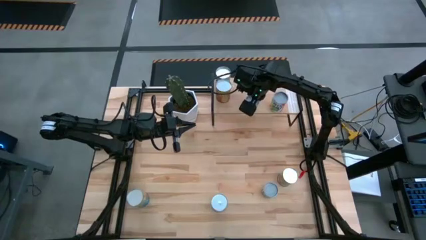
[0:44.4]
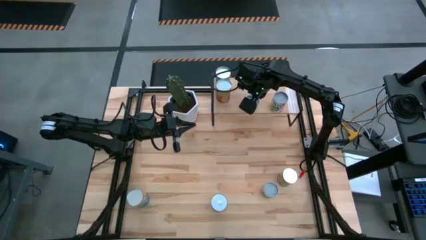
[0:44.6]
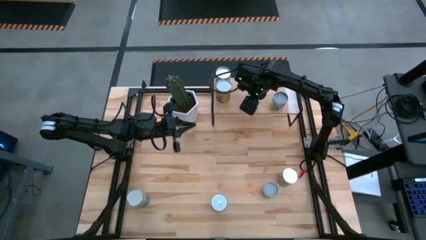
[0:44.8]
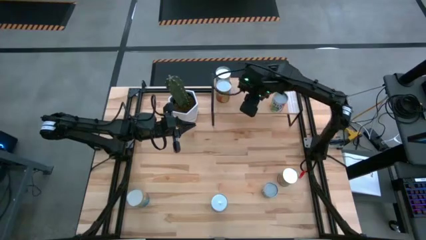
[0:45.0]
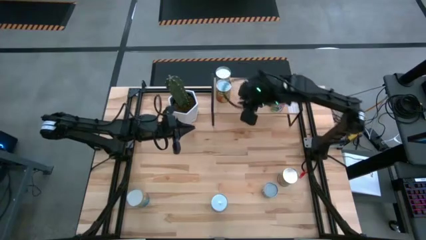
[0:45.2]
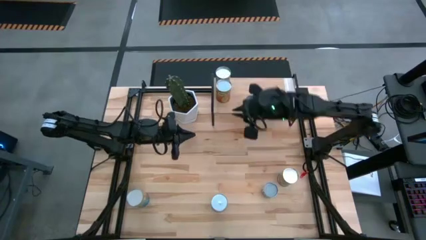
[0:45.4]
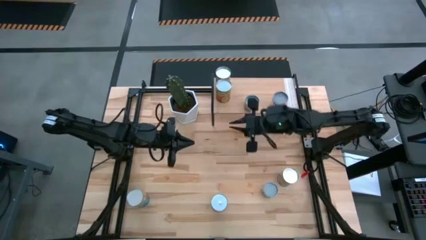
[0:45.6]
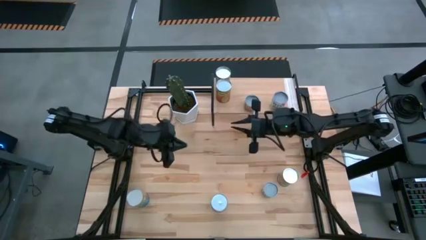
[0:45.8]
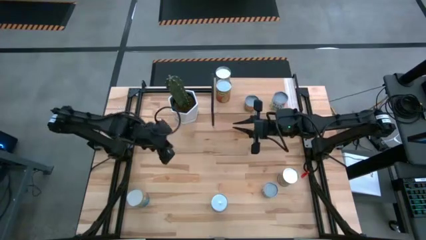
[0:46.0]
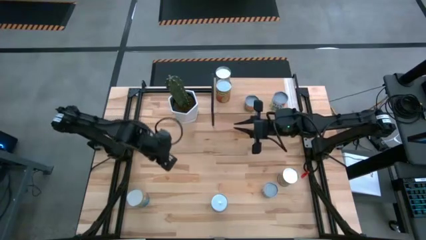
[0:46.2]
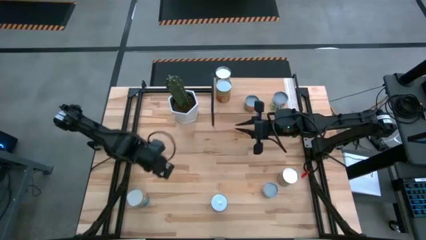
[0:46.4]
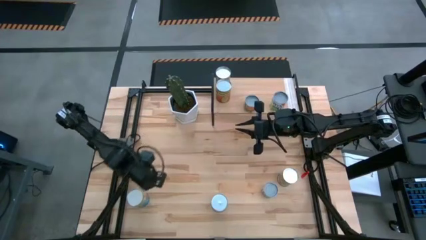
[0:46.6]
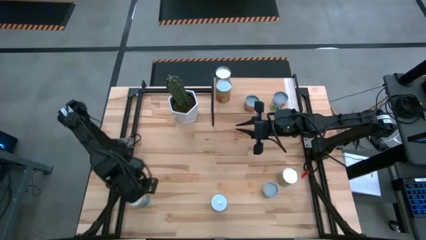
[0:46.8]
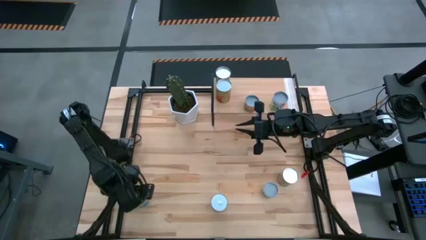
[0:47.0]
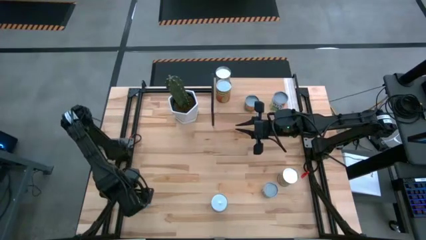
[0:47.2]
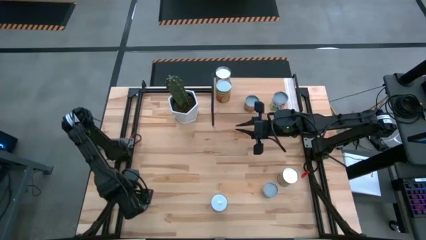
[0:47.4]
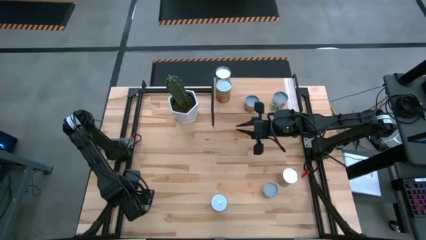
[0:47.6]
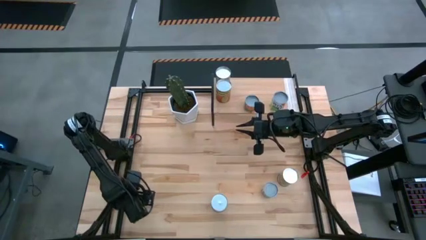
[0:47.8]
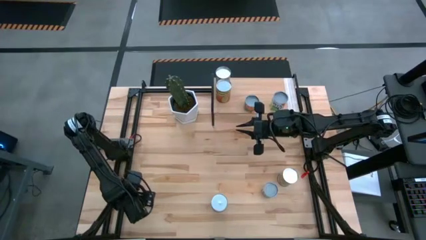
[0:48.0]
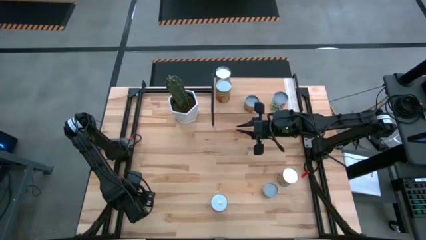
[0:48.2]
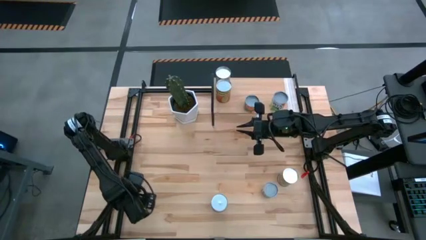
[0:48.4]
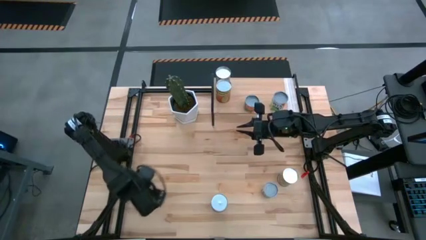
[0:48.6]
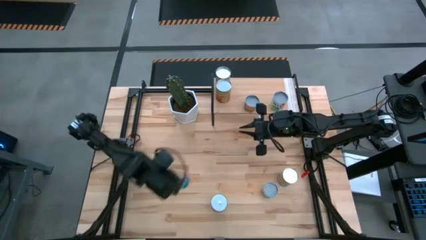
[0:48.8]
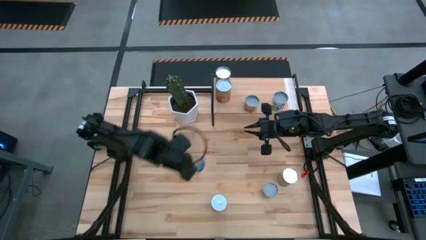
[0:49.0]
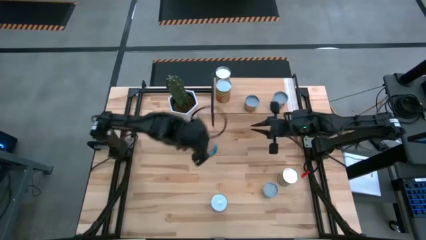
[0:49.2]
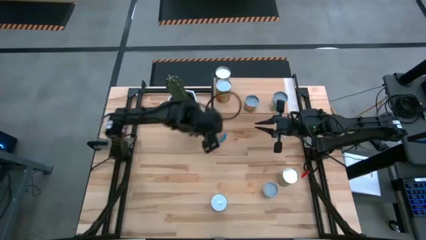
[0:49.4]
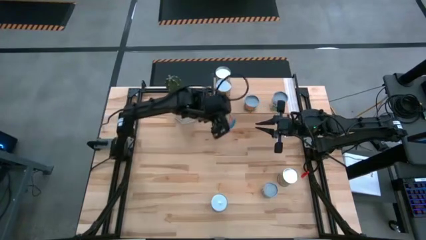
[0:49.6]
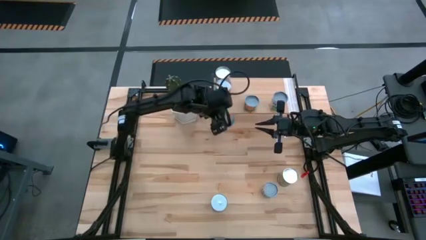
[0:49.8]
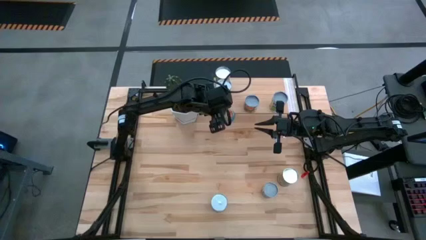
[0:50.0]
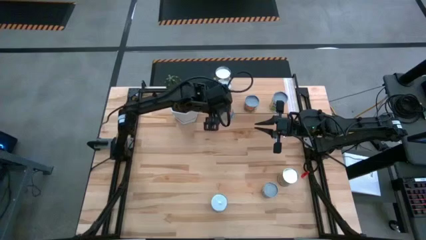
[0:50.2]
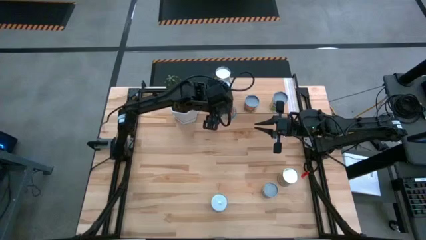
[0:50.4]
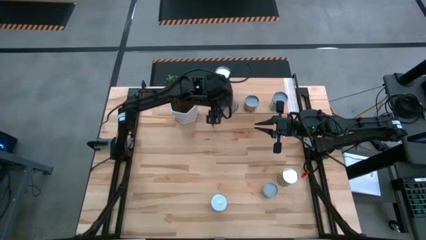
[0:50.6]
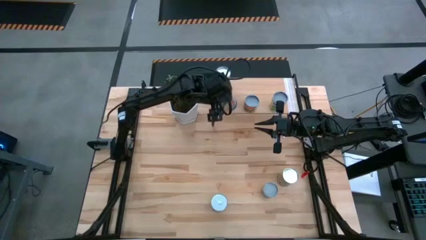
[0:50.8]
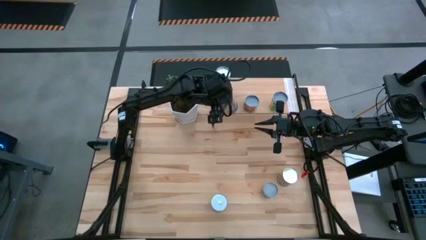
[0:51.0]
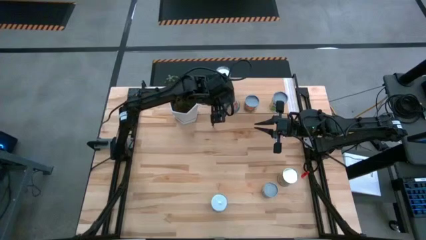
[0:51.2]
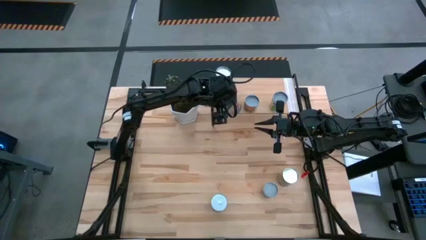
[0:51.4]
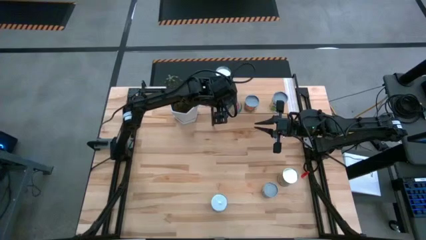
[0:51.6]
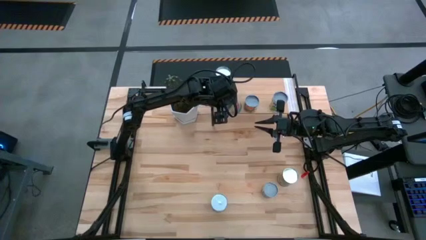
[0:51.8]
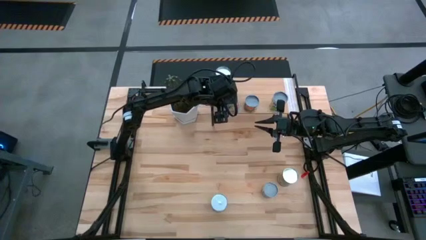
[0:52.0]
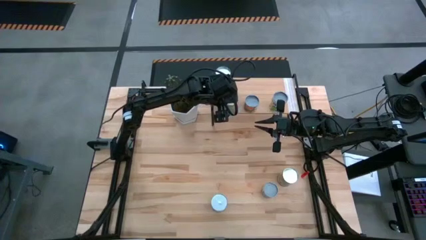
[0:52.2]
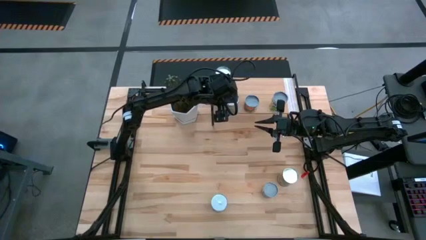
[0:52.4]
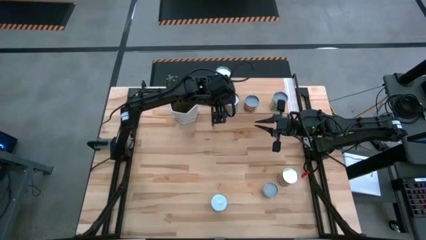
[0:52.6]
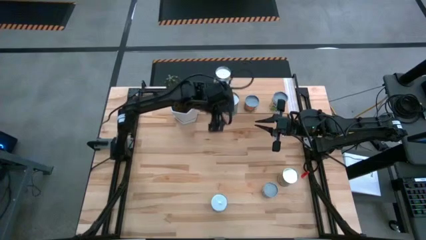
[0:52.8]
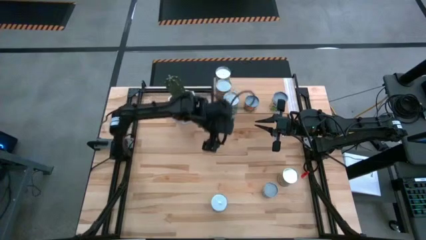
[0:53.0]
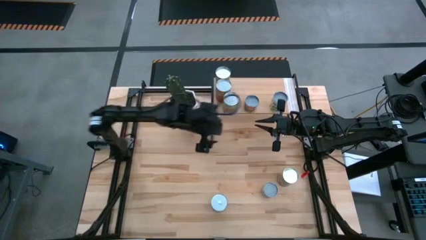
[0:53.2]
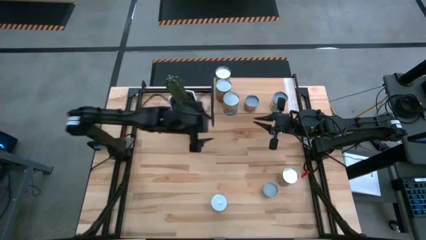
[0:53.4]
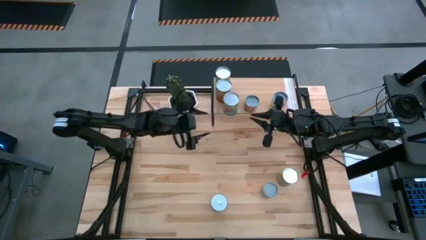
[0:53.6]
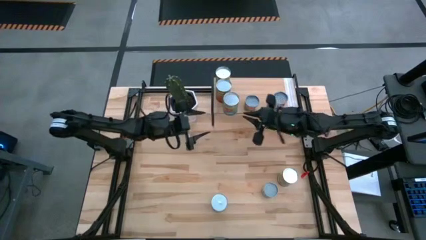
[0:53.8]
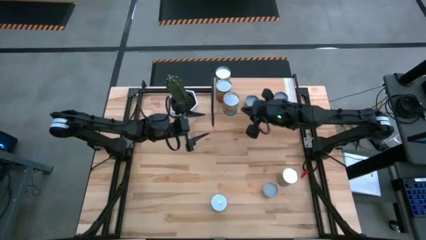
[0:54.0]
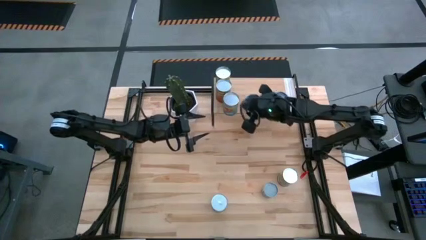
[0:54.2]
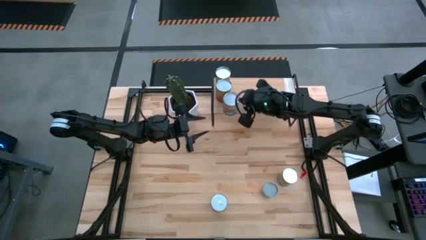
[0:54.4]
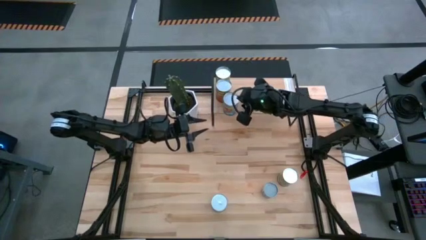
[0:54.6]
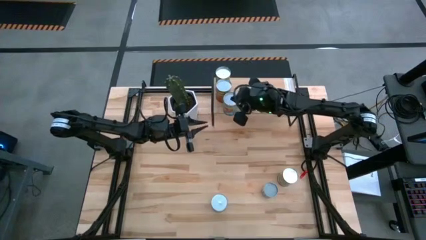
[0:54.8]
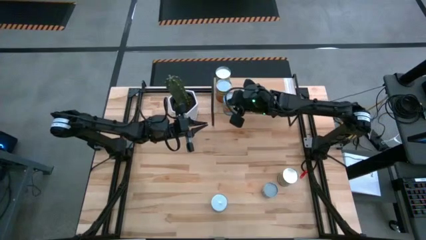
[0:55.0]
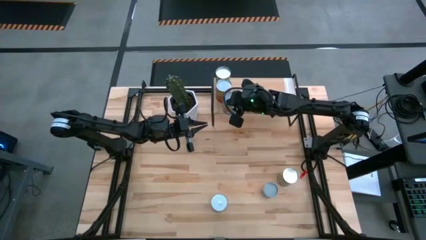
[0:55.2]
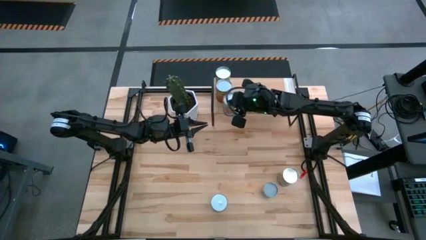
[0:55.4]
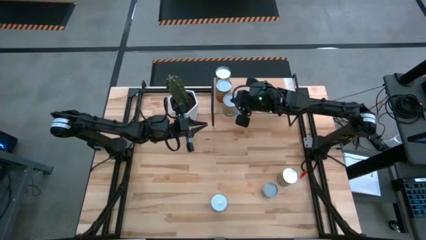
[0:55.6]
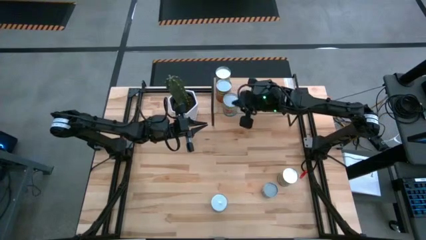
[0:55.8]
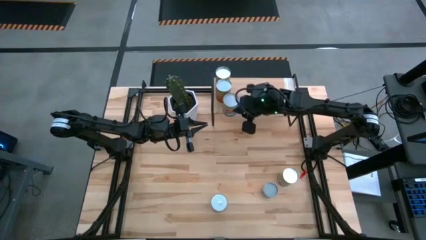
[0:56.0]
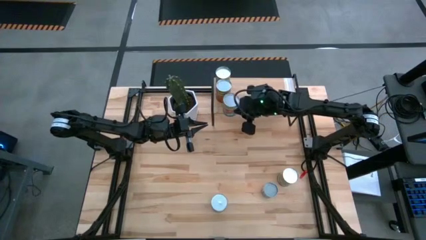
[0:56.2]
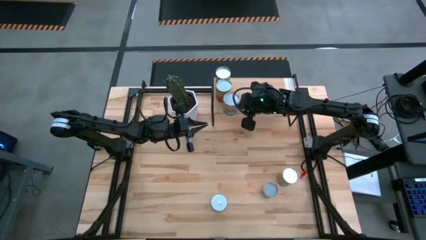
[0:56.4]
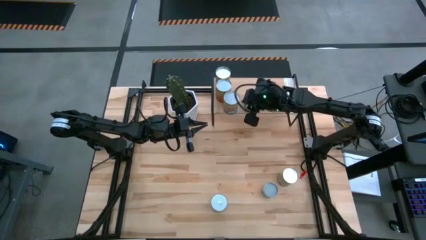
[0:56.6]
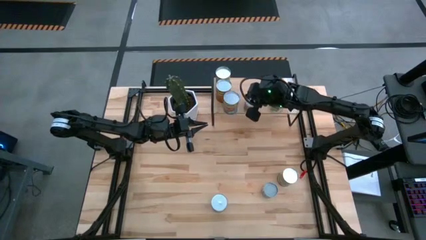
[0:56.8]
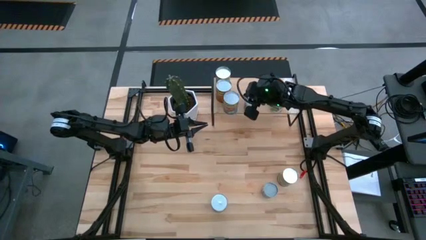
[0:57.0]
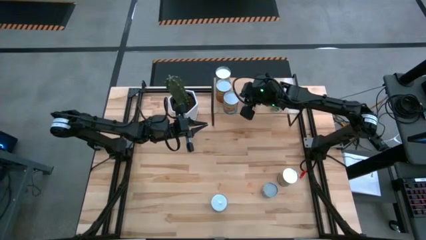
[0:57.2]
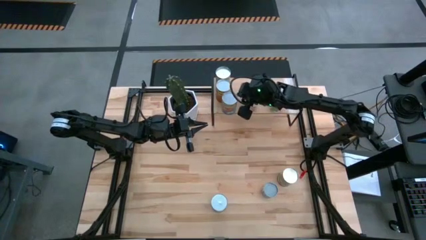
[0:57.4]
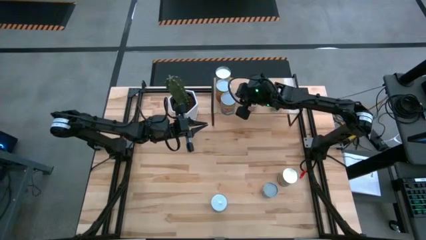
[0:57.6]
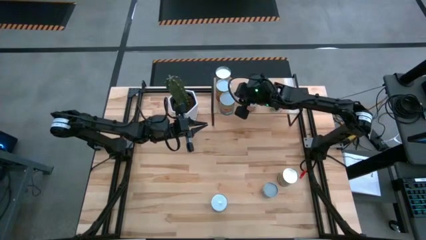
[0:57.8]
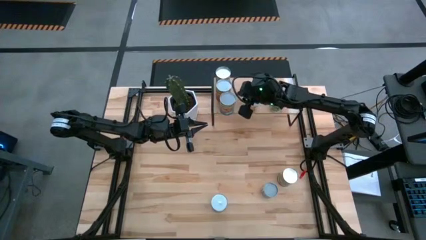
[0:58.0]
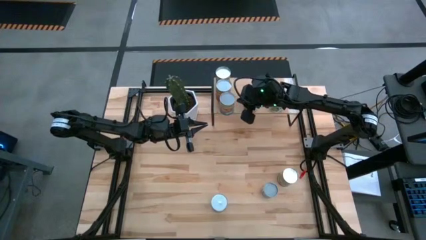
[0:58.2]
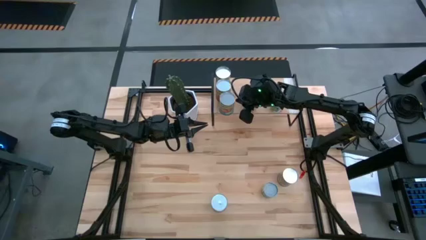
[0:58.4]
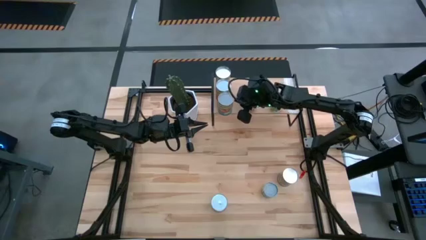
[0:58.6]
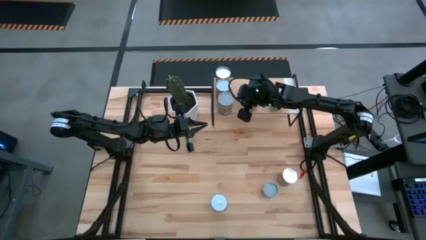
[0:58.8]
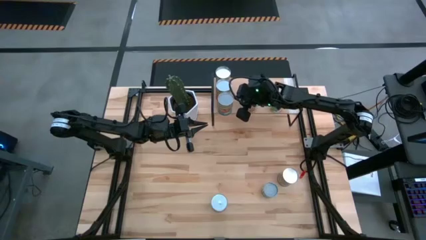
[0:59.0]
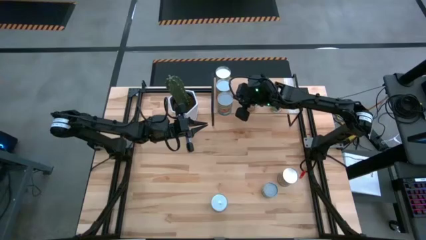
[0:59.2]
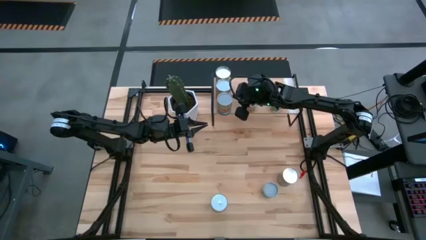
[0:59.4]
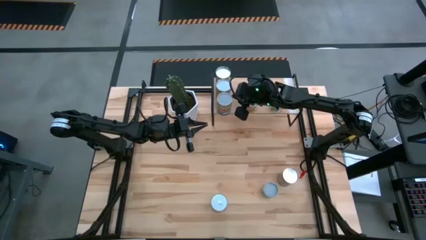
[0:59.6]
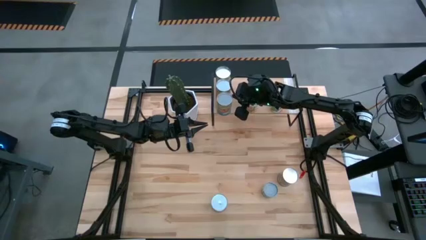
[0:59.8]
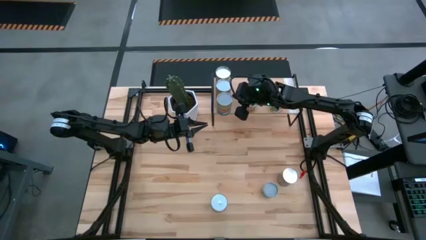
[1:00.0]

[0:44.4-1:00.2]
Task: Pick and place cans onto a shelf
Put the canned tomatoes on the shelf
